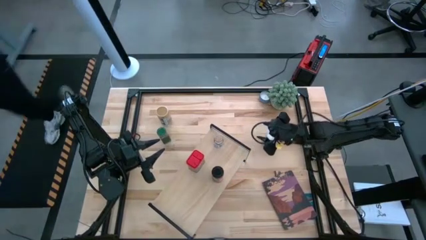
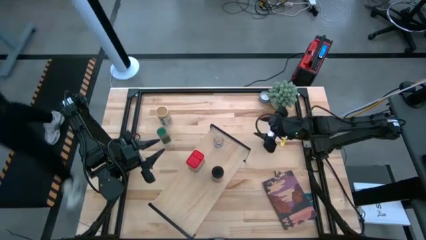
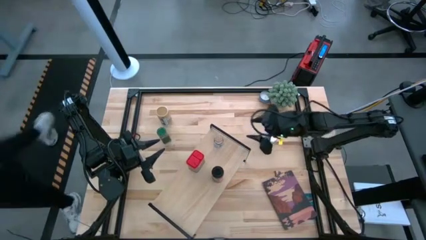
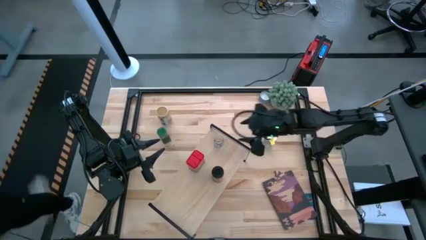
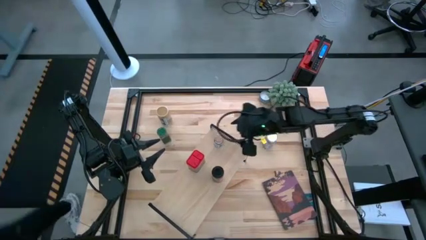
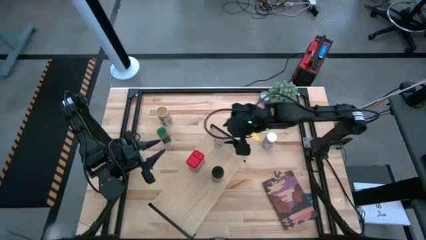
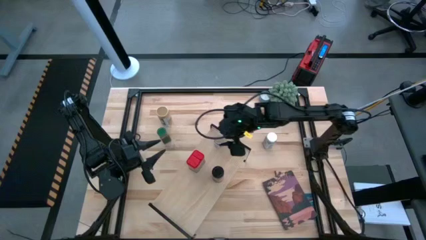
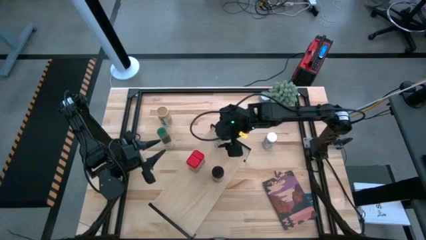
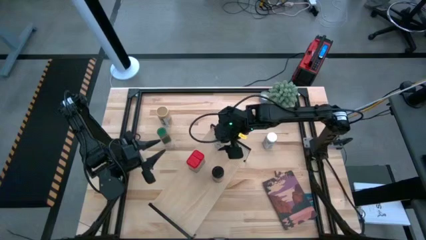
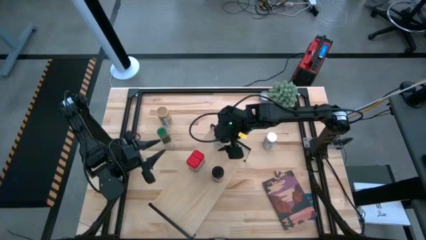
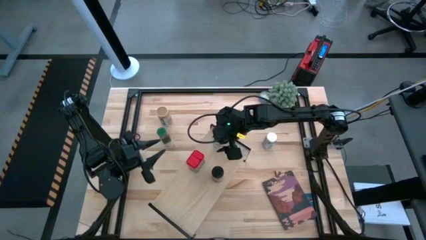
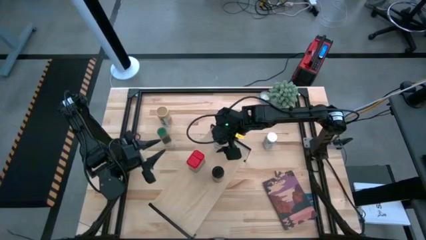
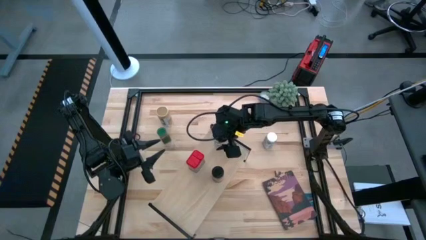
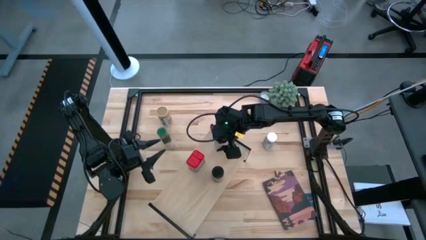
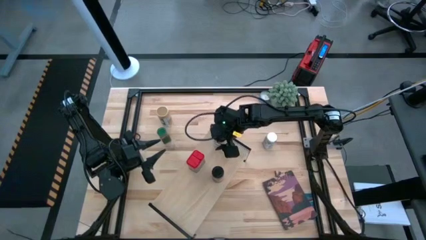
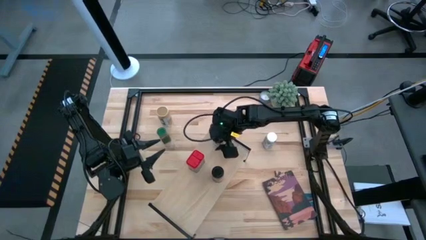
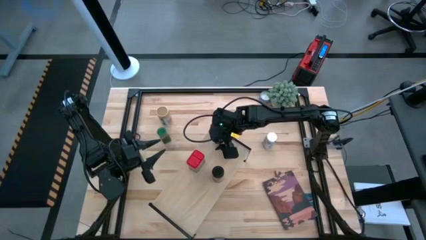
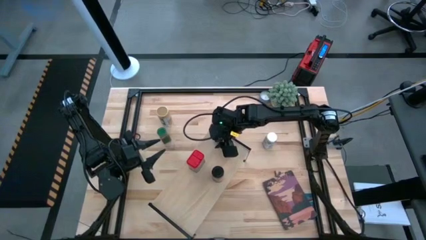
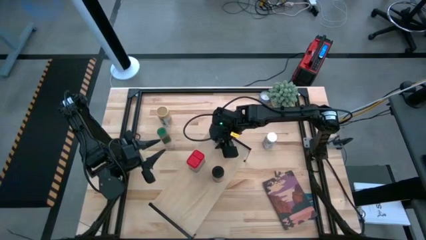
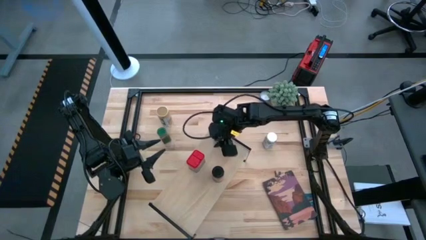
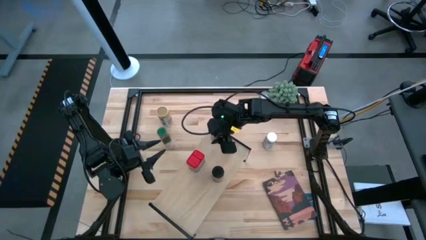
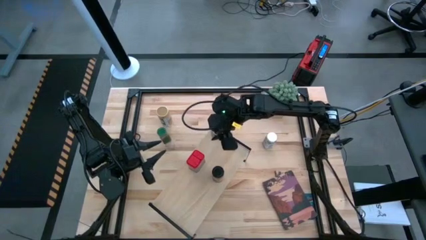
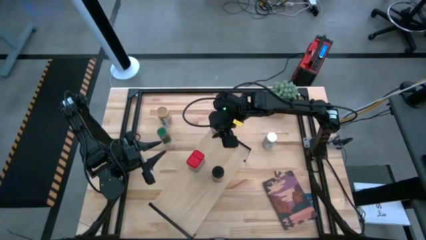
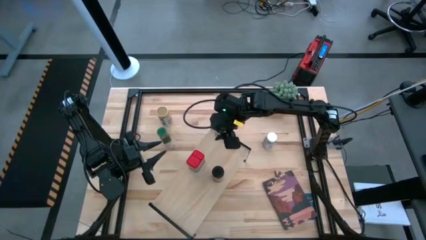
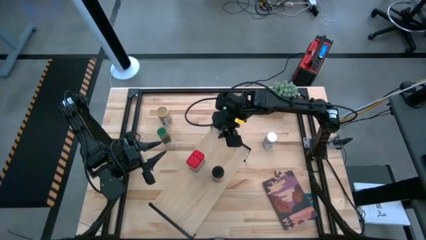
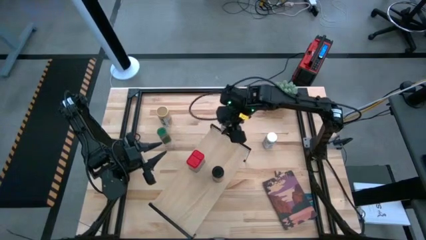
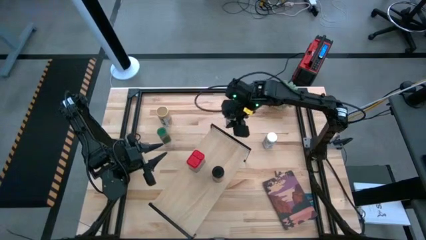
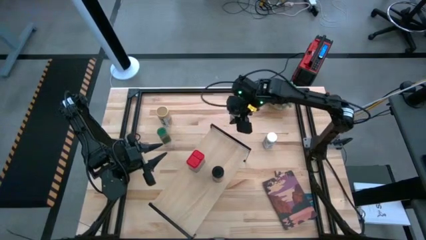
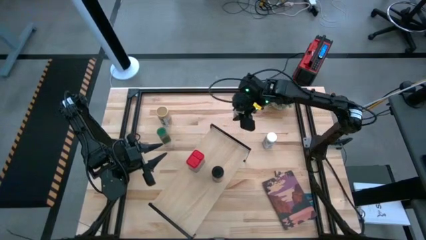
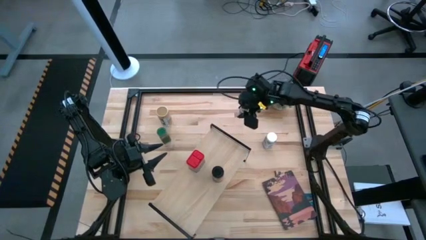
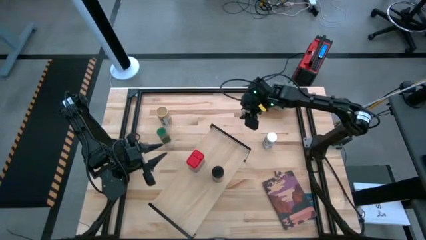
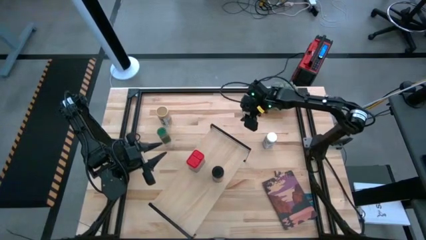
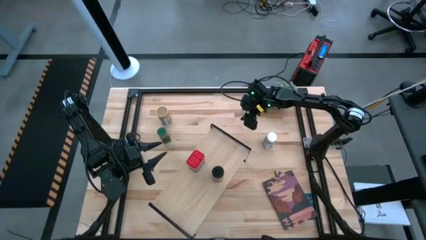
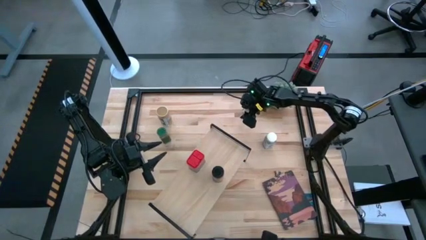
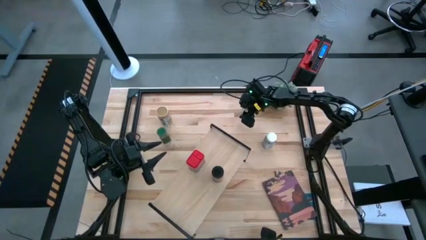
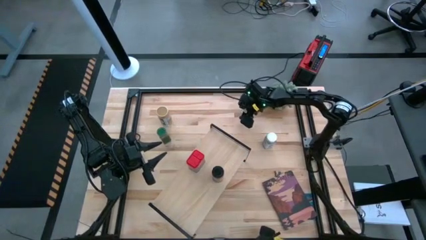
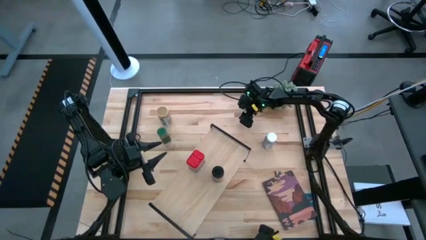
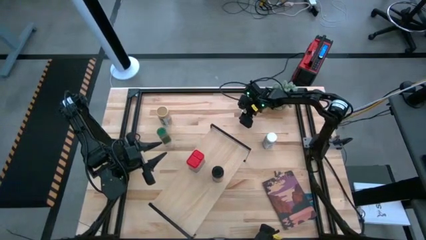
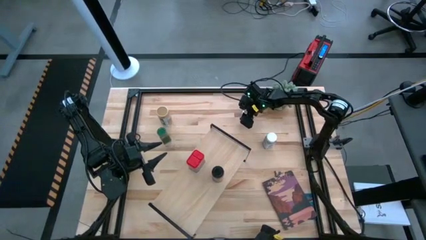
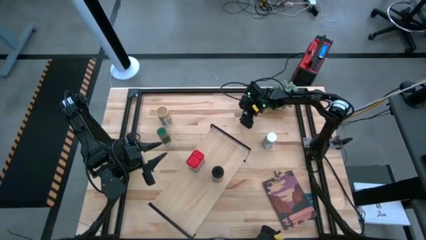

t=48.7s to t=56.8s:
Task: Shelf spices
Remove the brown seasoning bottle from the shelf

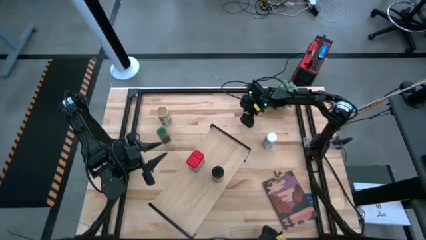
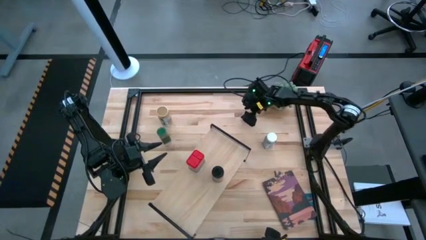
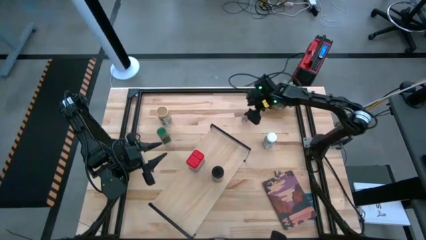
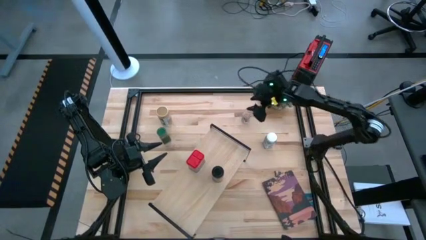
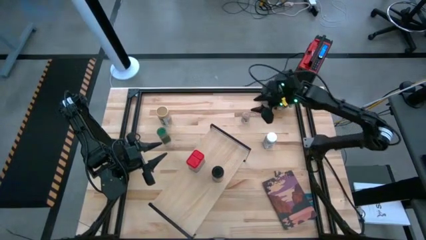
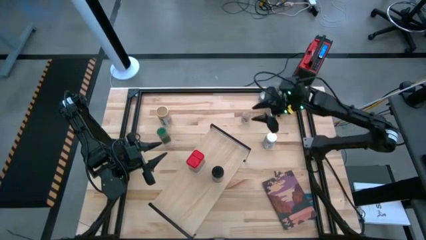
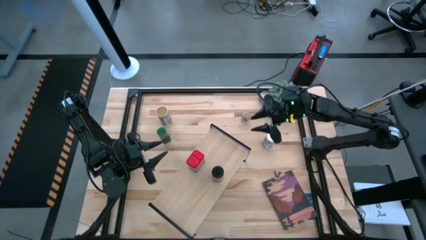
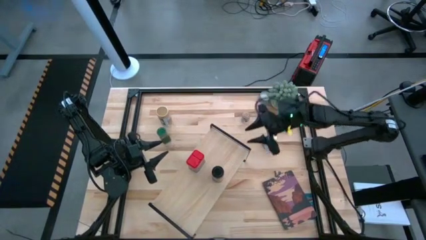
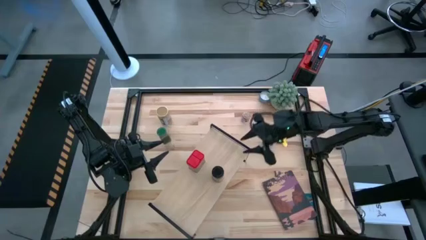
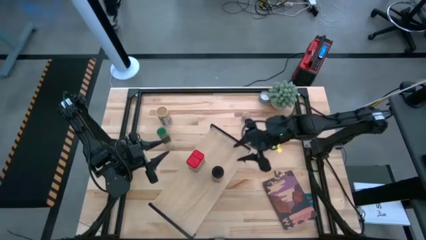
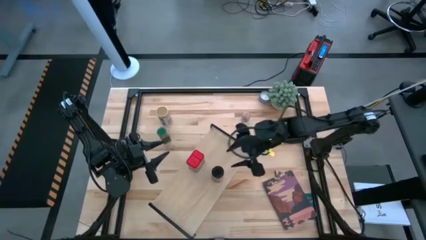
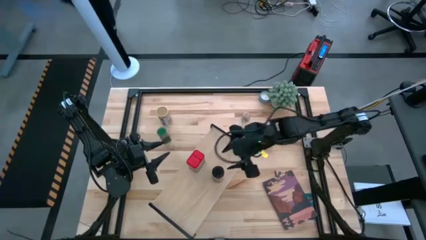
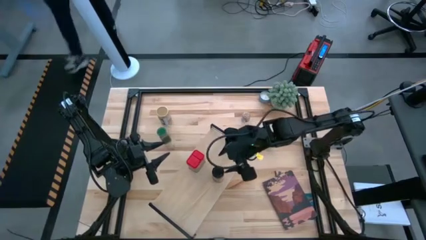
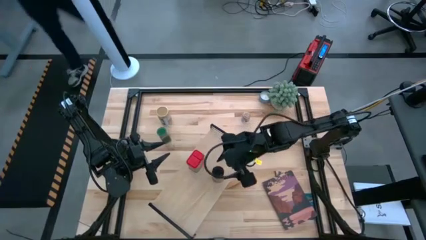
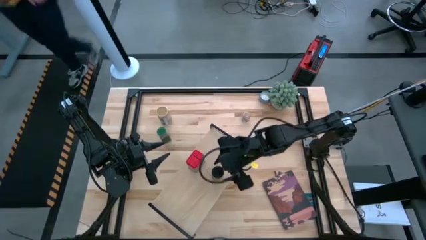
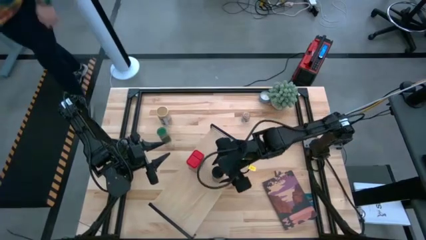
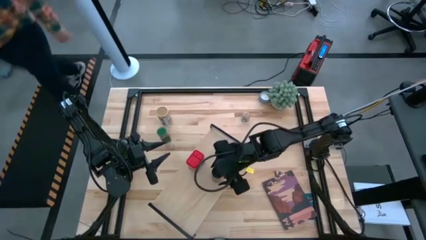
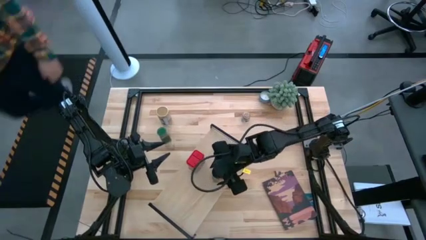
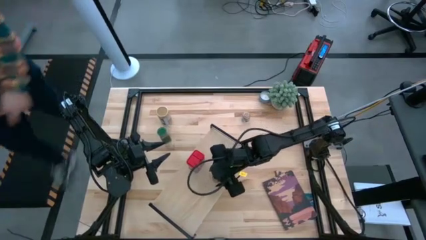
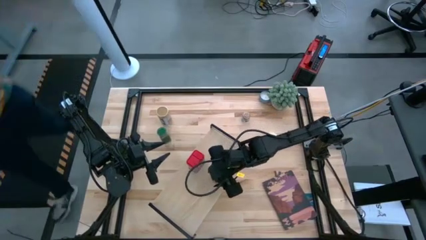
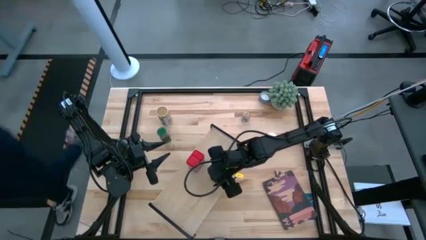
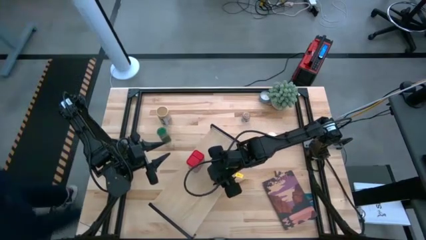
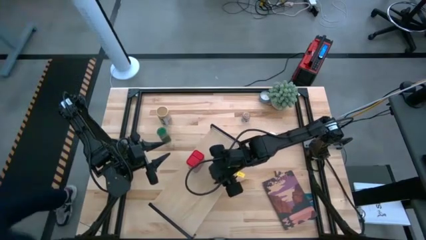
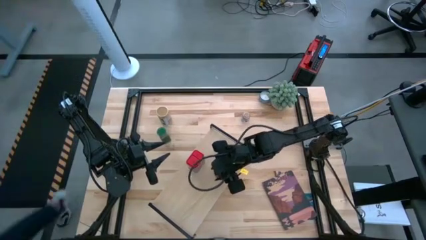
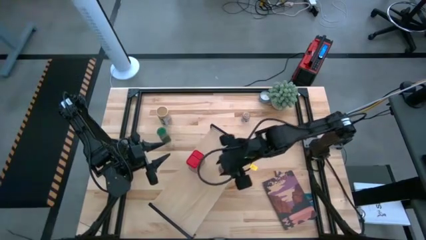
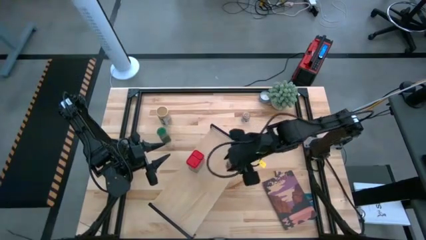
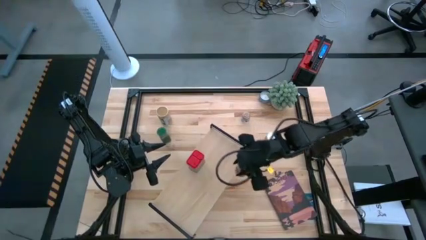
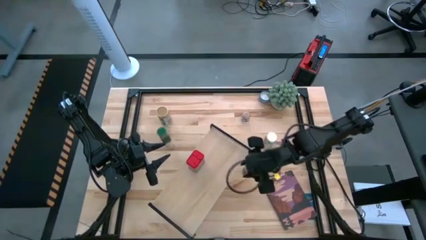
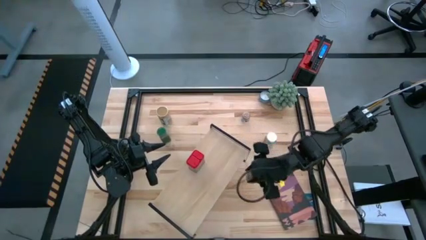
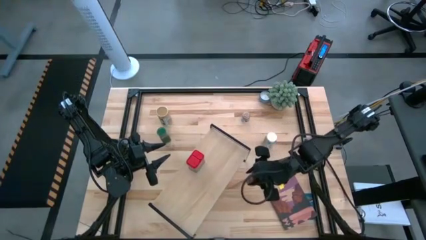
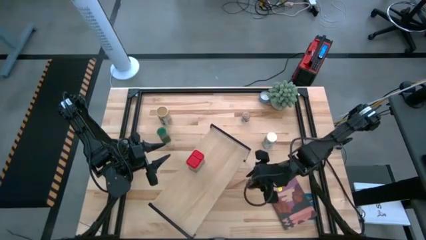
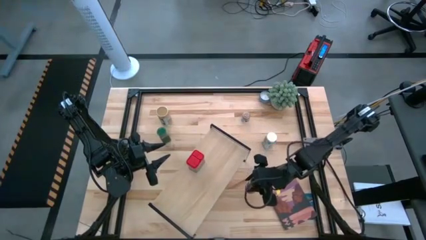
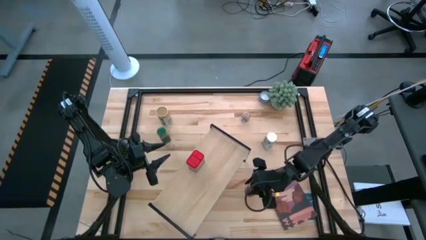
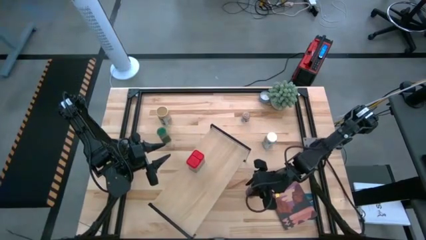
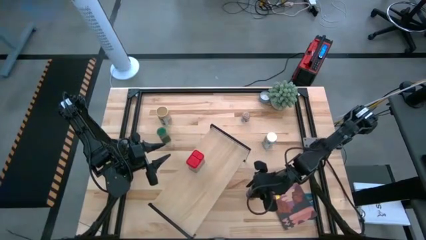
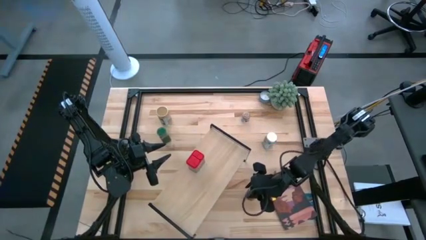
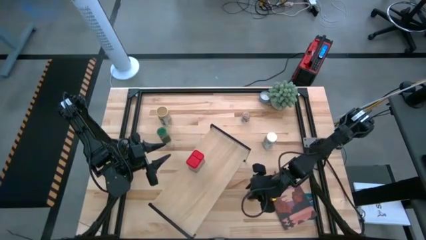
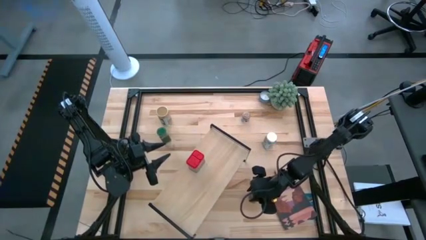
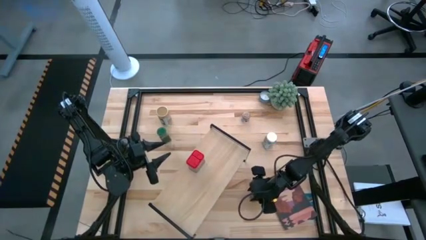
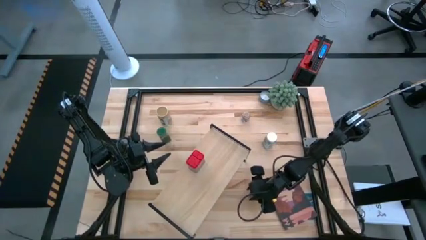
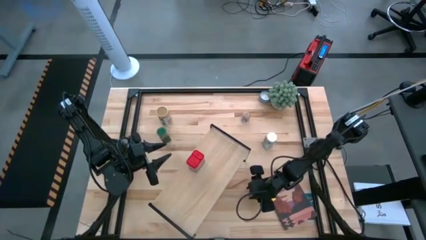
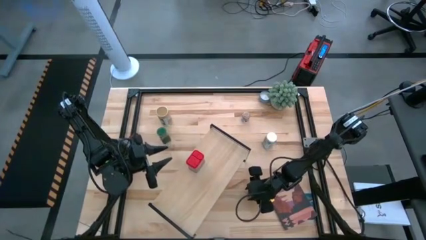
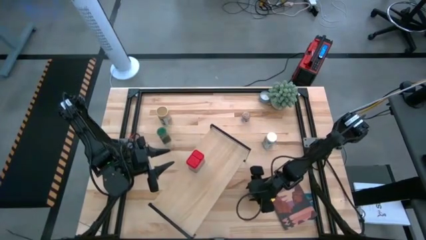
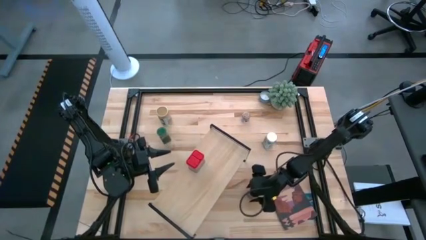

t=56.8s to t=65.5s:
Remove the black seasoning bottle from the shelf
